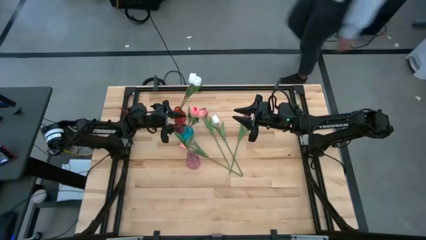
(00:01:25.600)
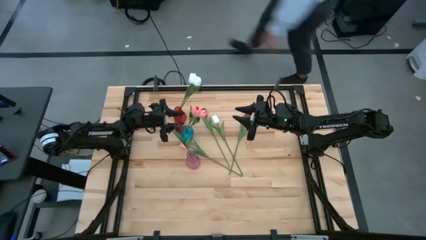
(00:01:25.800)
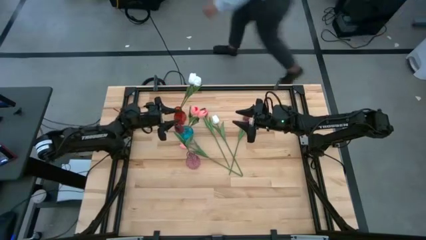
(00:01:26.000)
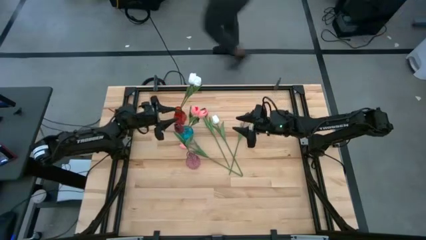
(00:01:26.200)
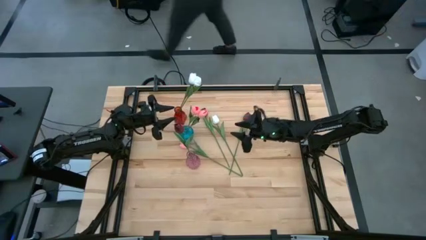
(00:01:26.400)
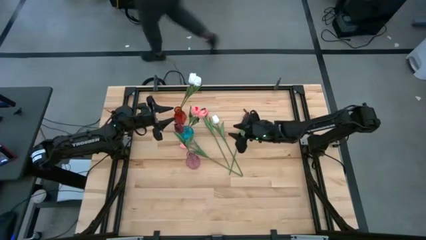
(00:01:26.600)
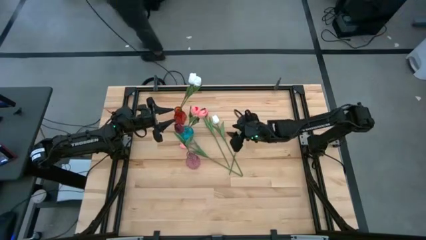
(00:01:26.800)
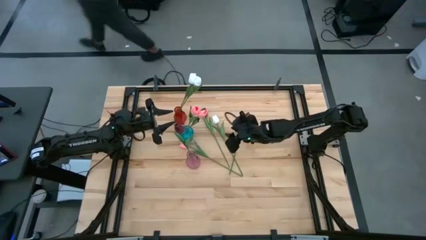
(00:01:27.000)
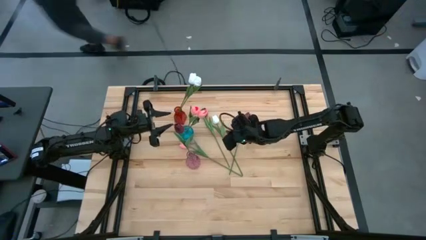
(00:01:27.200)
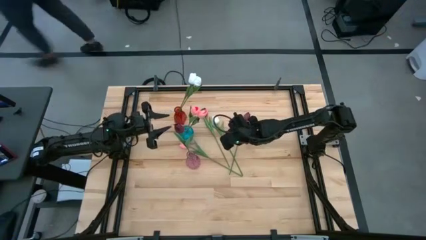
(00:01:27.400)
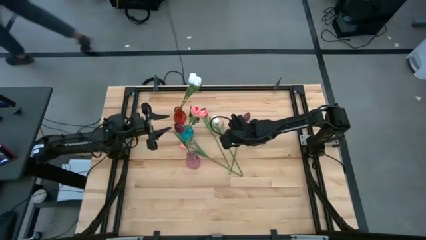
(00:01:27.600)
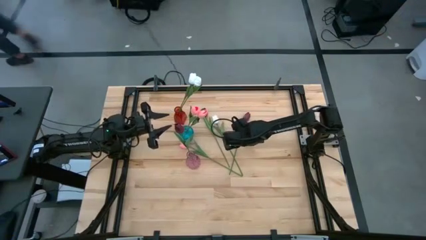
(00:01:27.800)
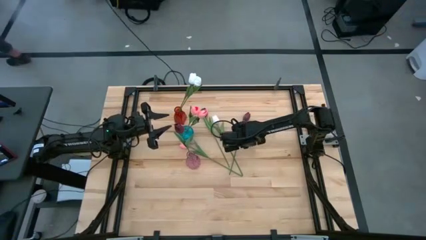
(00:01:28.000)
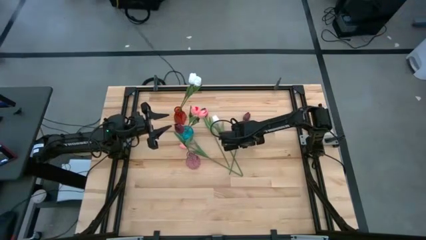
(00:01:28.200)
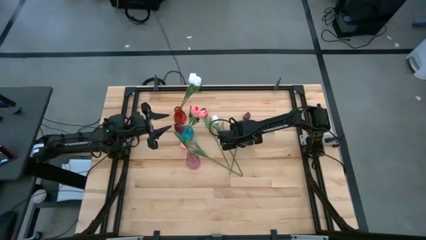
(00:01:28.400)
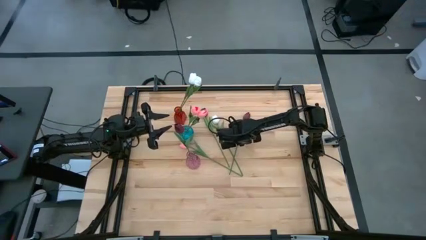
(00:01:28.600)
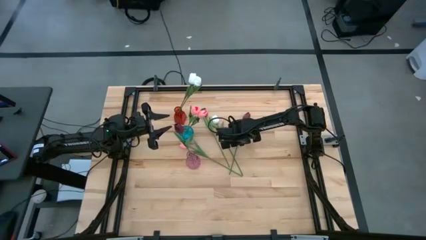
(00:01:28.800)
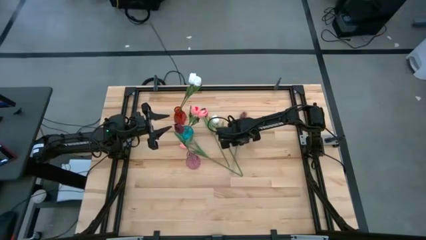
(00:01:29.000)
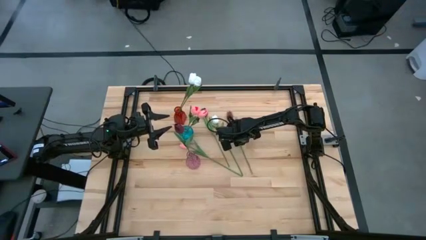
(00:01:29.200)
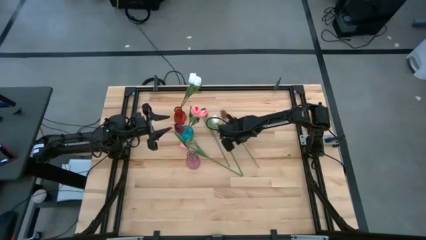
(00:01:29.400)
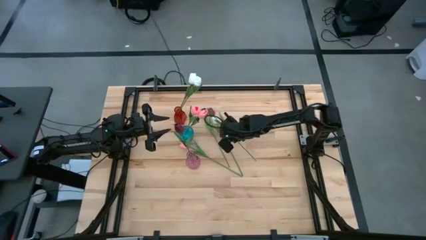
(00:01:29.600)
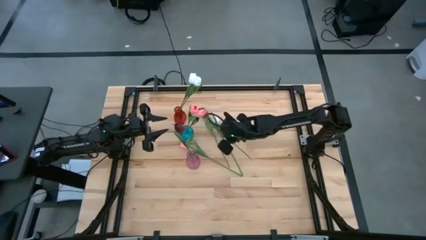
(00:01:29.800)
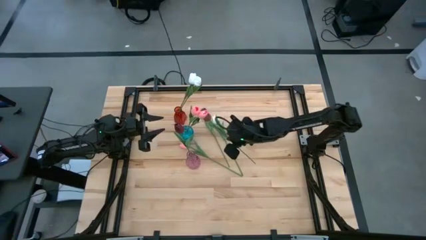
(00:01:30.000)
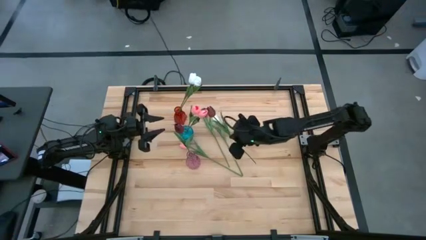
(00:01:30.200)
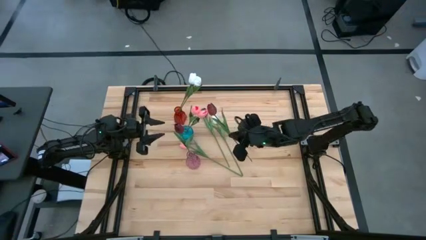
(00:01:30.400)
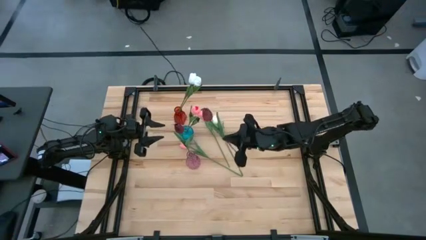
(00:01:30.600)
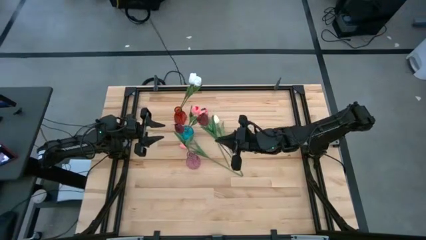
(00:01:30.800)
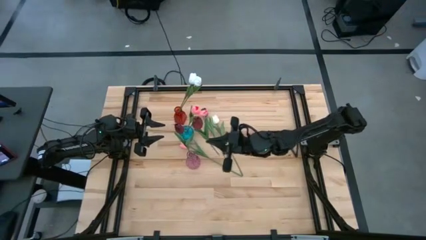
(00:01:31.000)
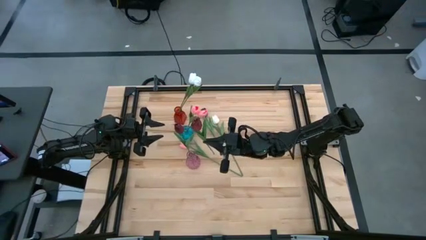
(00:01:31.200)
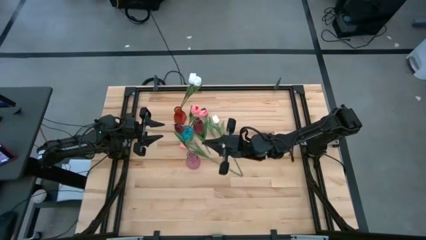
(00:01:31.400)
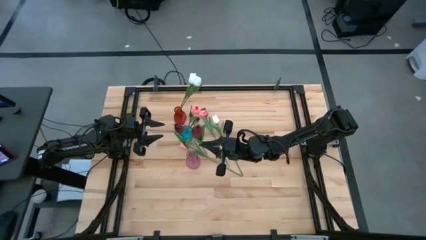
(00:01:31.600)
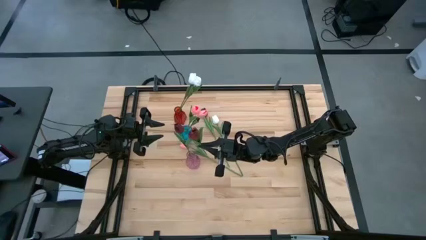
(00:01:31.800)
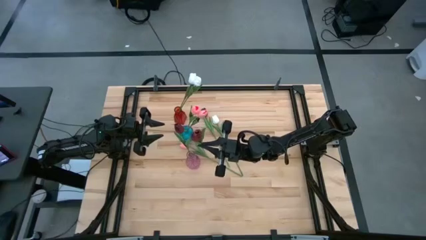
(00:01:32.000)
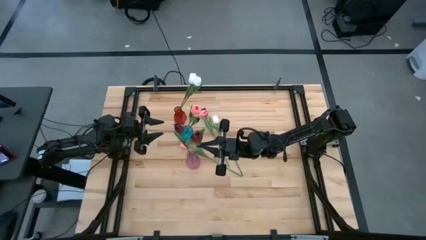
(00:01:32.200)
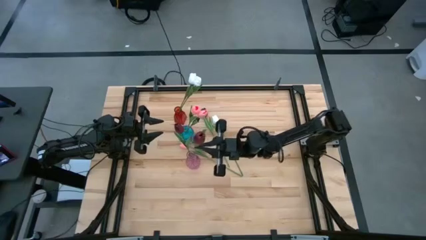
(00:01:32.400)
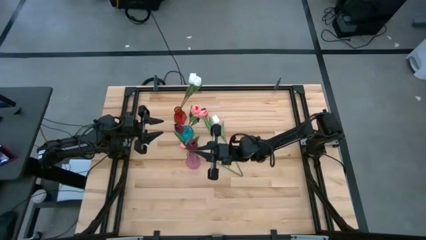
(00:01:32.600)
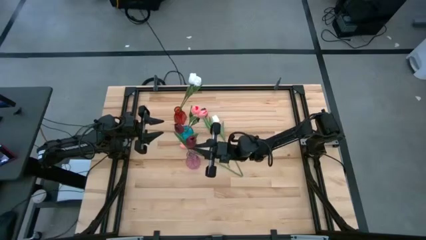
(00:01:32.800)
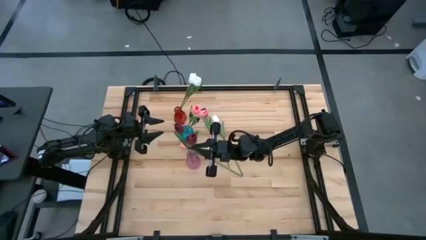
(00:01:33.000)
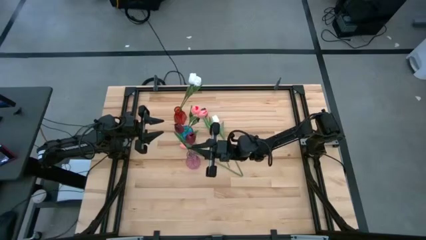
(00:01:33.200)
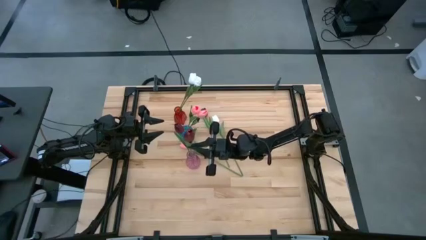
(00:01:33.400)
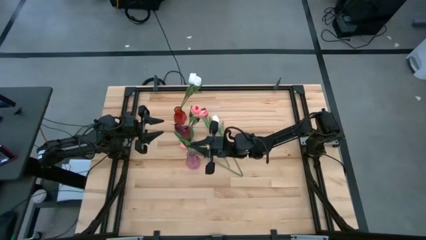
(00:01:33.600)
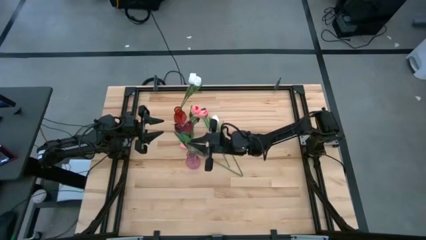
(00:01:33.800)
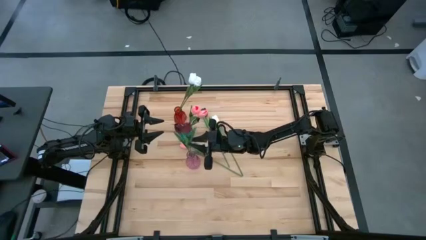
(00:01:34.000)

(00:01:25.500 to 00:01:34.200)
Task: Sort flowers into vase by color
Put the right red flower into the purple vase

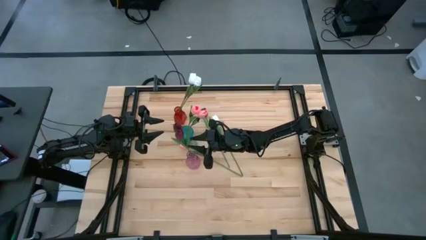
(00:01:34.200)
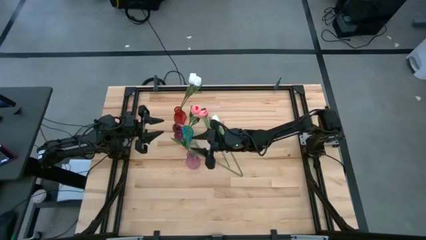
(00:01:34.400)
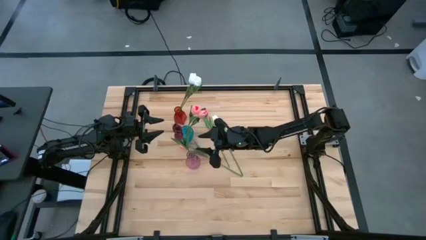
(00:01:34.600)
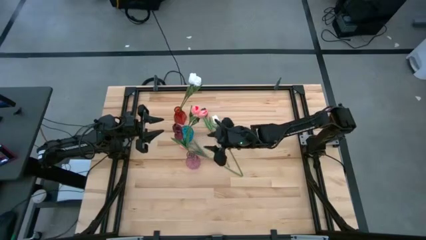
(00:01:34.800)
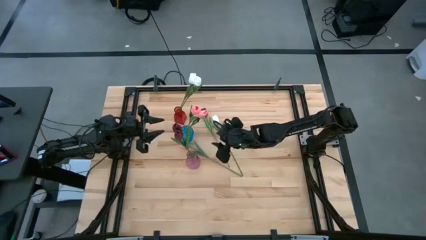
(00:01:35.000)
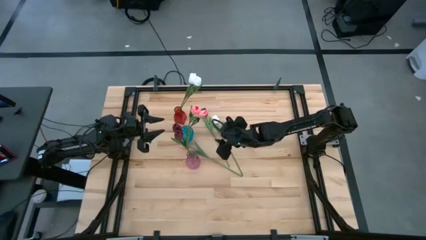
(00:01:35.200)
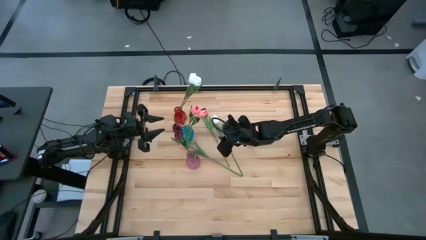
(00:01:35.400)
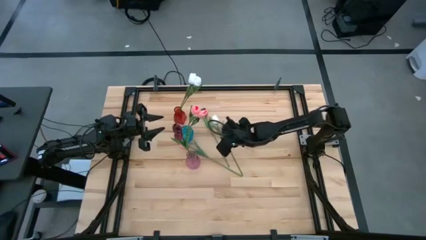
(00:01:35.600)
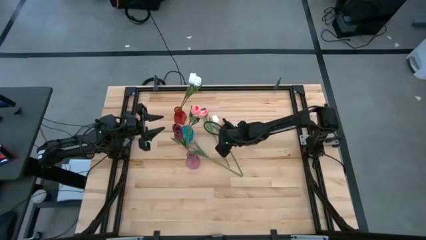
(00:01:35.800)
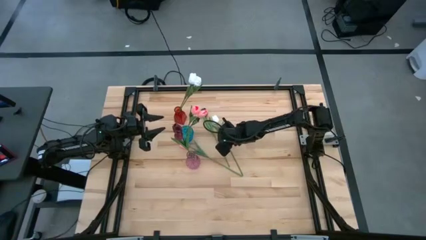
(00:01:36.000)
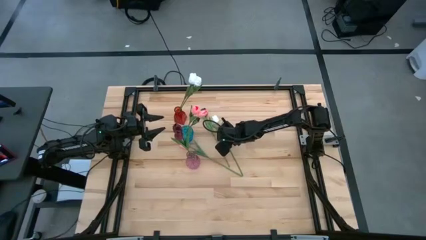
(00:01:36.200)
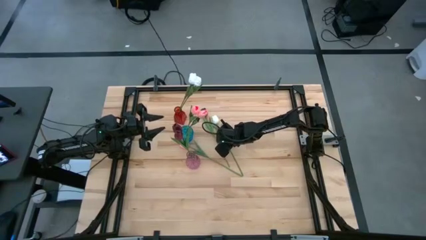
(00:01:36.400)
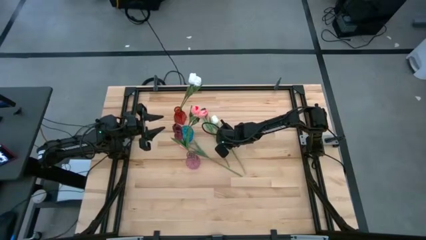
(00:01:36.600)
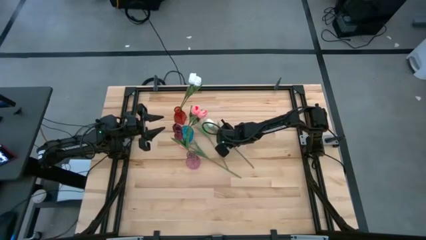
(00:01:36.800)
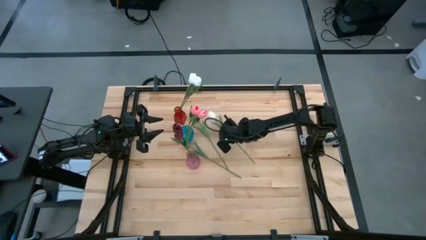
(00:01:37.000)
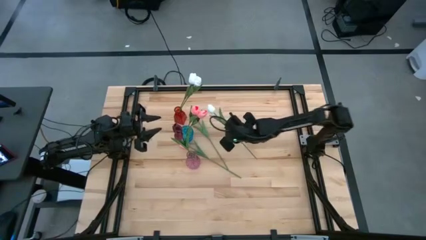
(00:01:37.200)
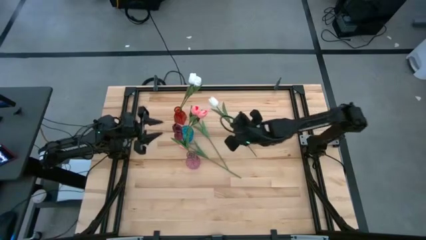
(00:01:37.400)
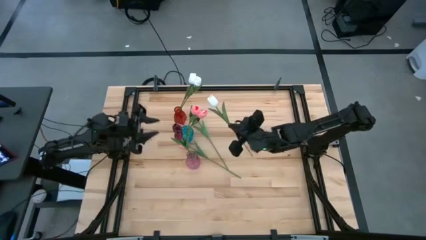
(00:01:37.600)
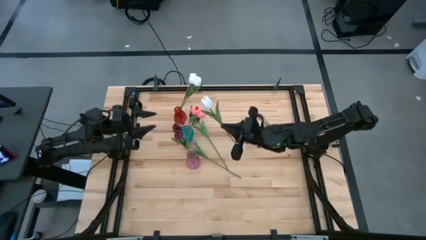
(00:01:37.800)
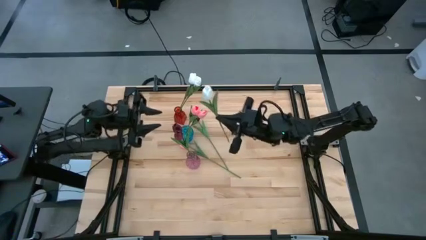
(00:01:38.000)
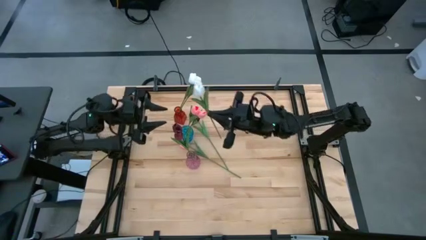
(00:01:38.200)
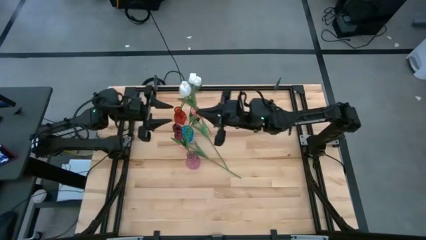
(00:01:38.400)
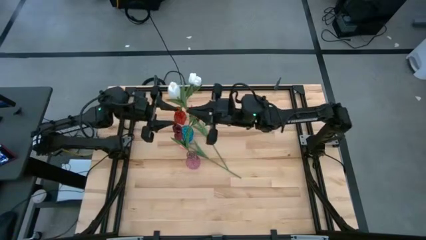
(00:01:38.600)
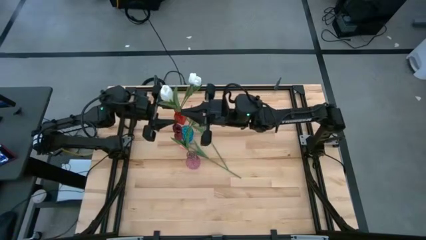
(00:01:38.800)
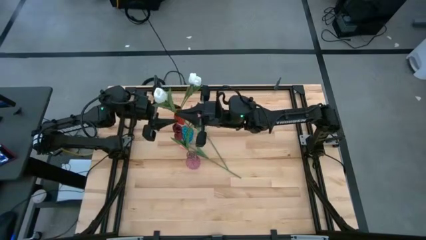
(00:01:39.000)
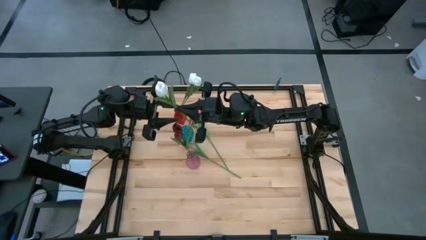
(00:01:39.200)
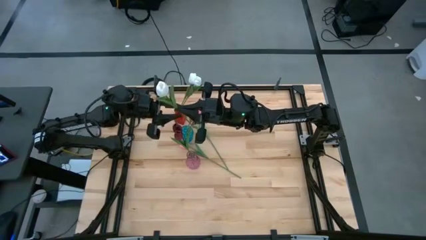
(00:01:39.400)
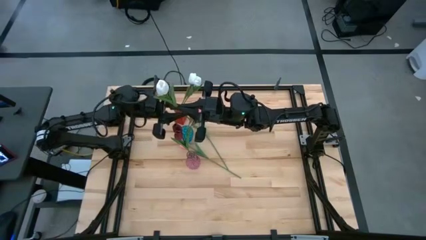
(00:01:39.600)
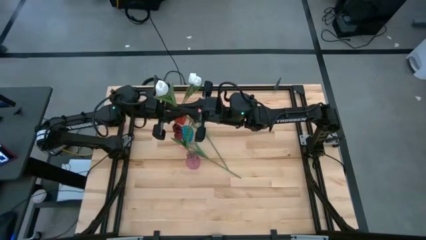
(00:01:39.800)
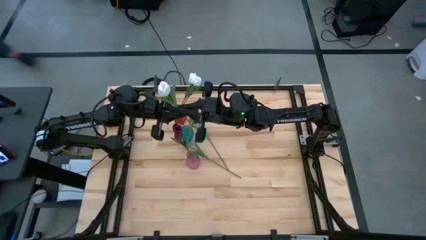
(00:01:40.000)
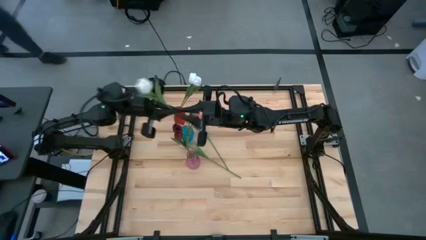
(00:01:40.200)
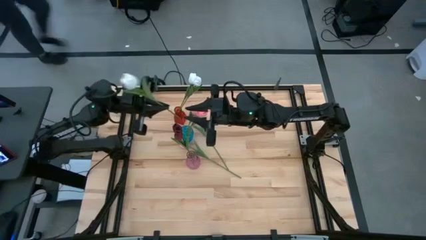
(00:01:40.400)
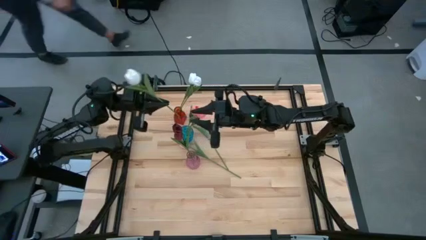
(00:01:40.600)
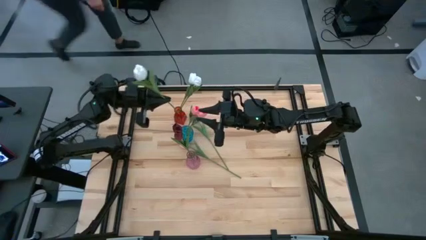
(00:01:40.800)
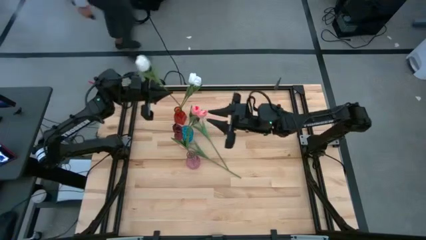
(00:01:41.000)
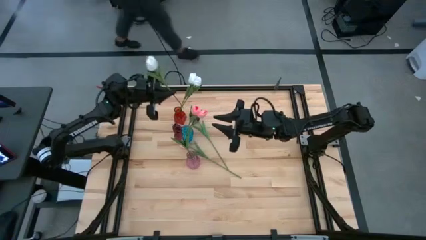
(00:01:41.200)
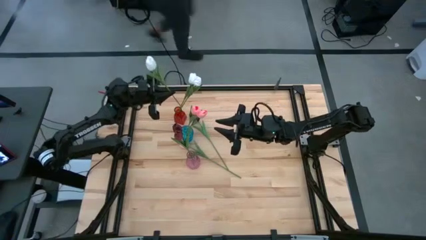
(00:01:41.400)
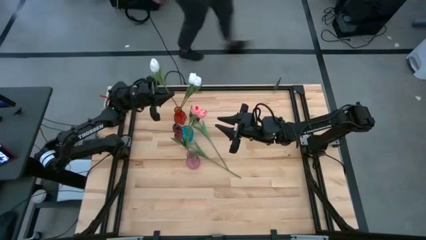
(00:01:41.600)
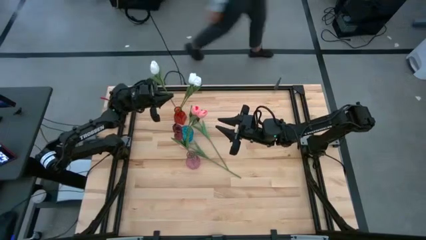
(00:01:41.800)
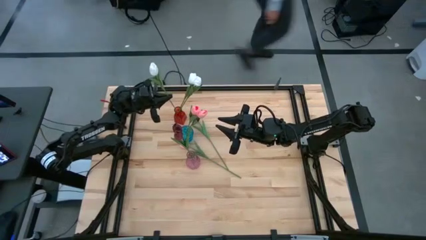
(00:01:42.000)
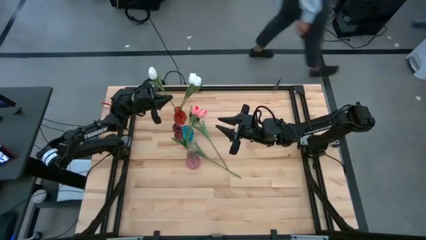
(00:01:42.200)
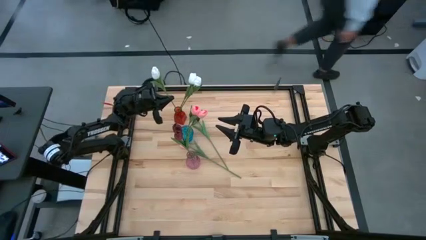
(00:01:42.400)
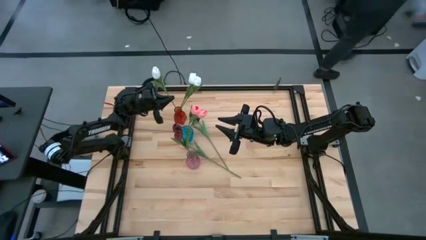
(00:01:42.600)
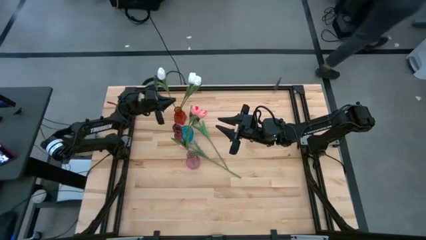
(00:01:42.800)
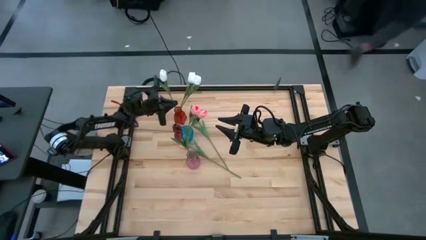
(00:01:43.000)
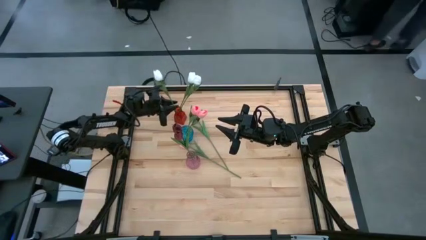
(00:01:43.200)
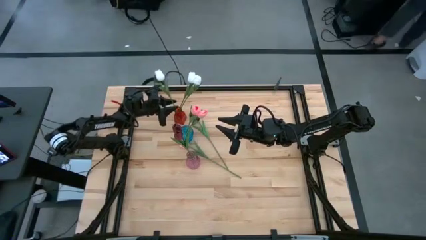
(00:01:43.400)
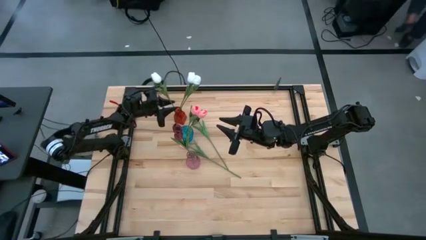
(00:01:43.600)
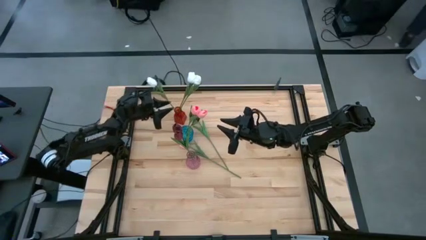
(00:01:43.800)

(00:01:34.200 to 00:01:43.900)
Put the white flower into the red vase
